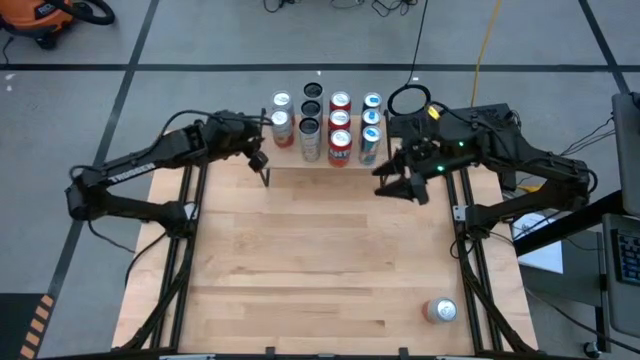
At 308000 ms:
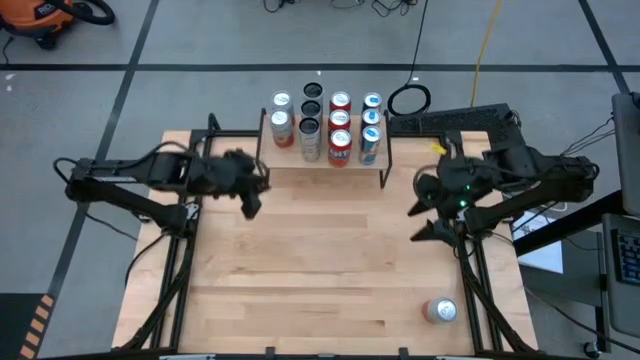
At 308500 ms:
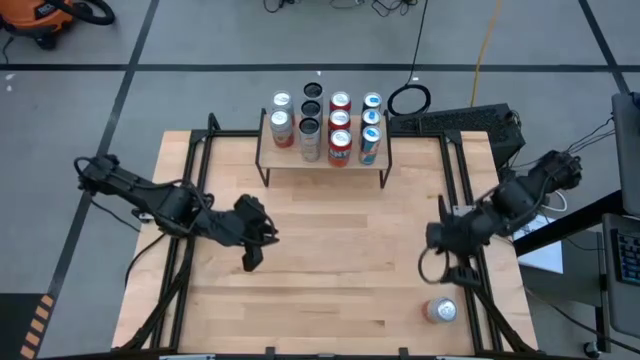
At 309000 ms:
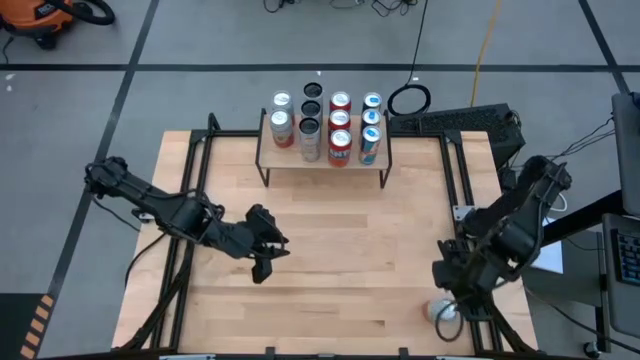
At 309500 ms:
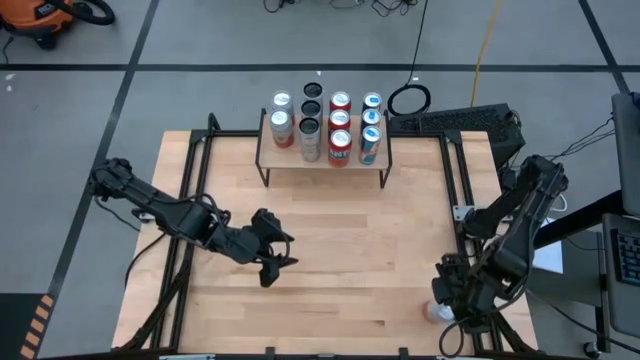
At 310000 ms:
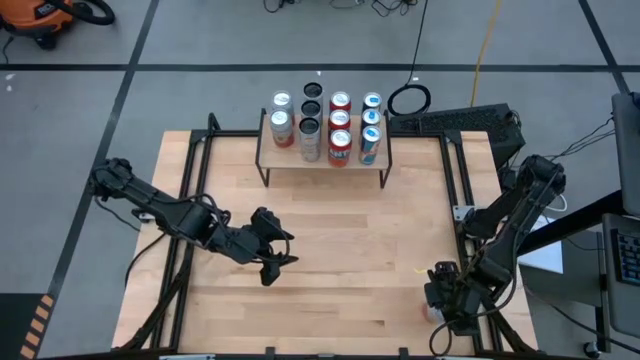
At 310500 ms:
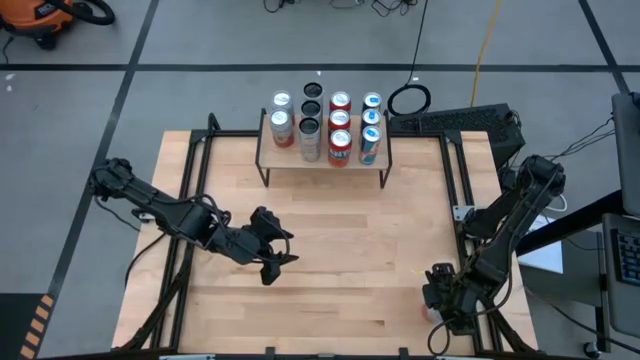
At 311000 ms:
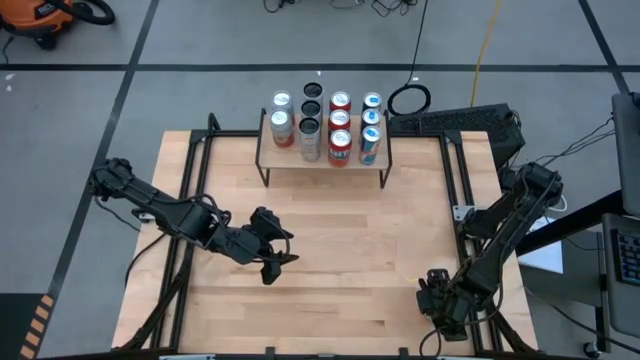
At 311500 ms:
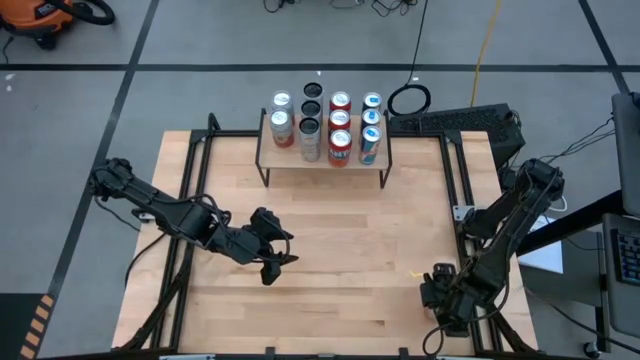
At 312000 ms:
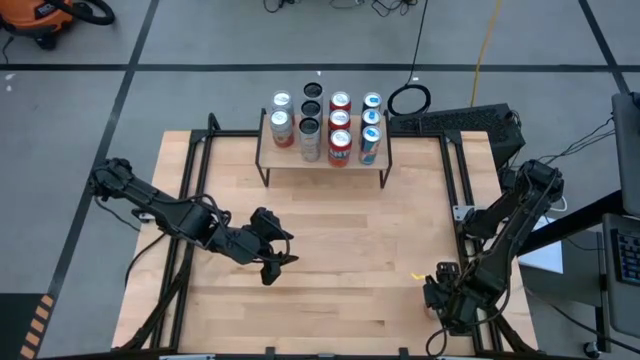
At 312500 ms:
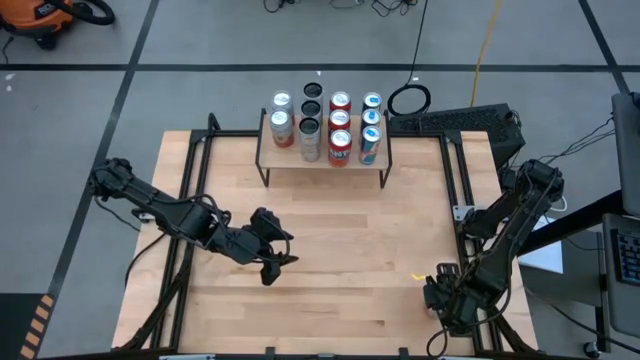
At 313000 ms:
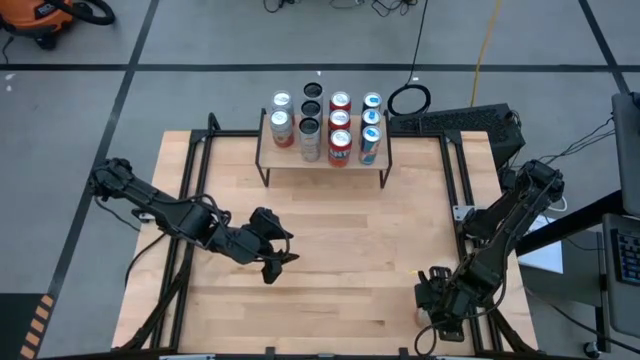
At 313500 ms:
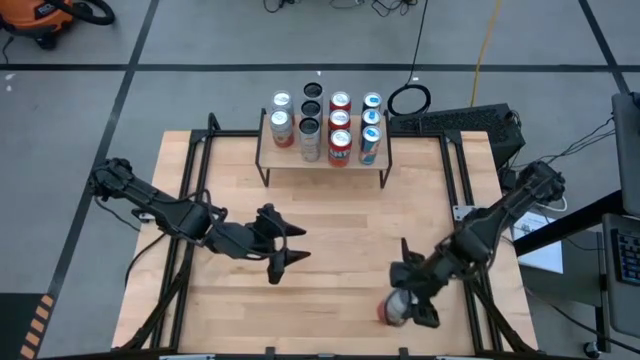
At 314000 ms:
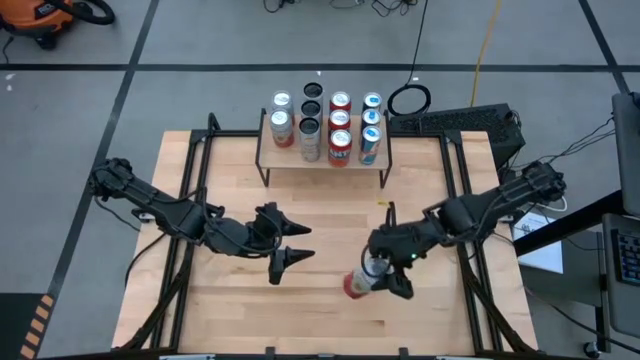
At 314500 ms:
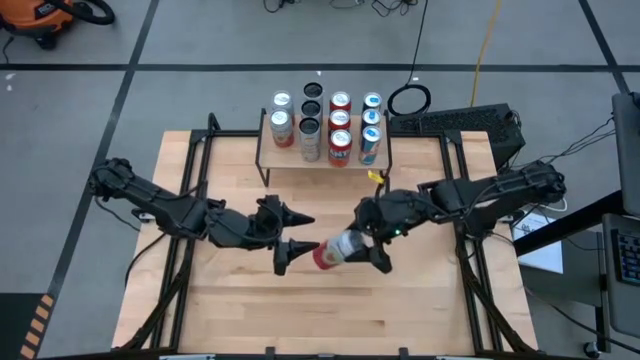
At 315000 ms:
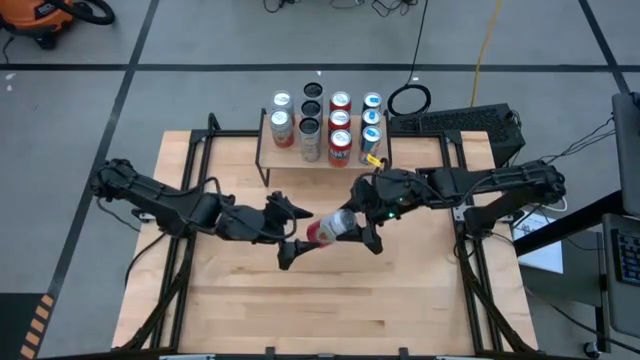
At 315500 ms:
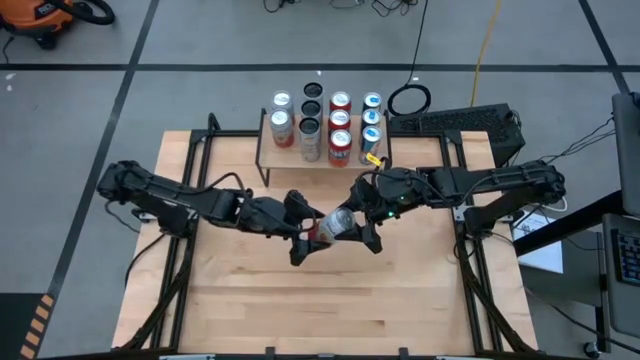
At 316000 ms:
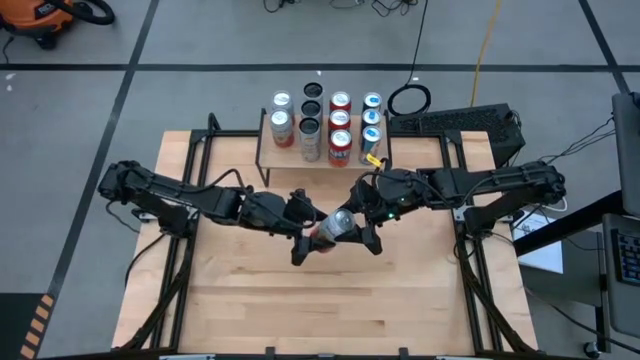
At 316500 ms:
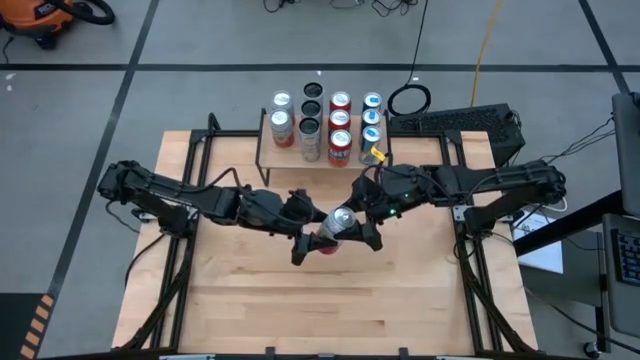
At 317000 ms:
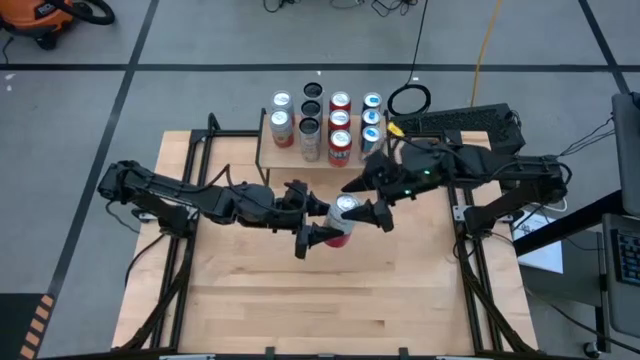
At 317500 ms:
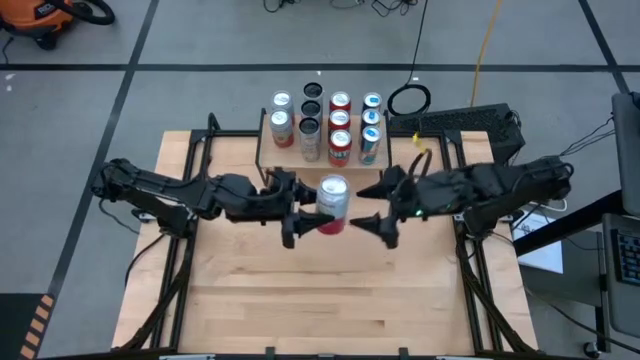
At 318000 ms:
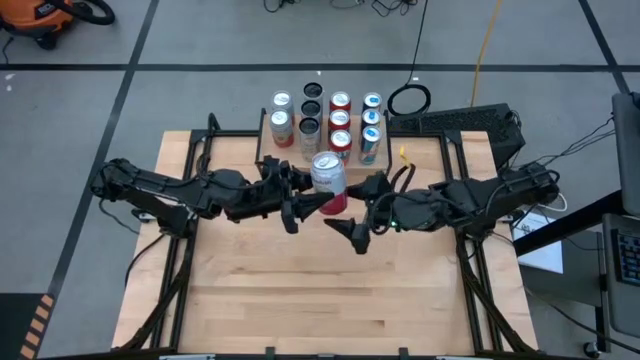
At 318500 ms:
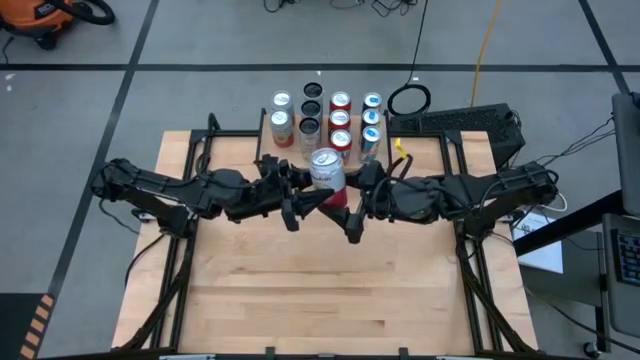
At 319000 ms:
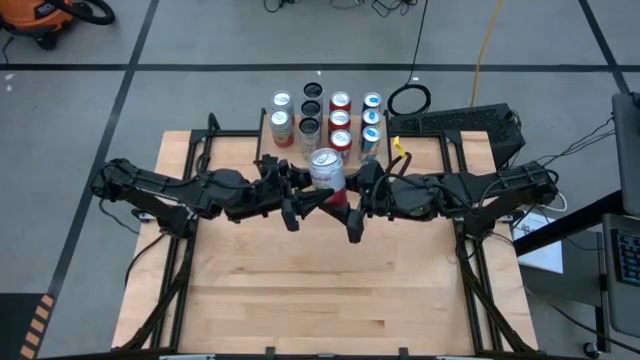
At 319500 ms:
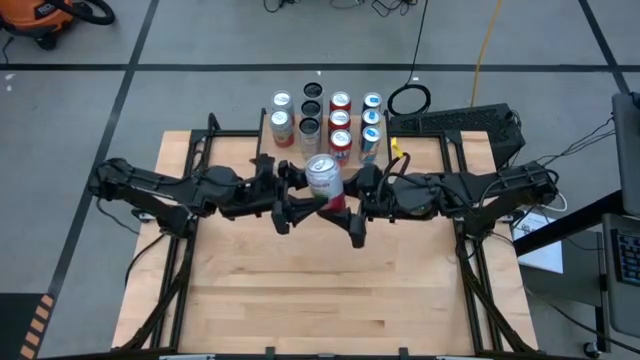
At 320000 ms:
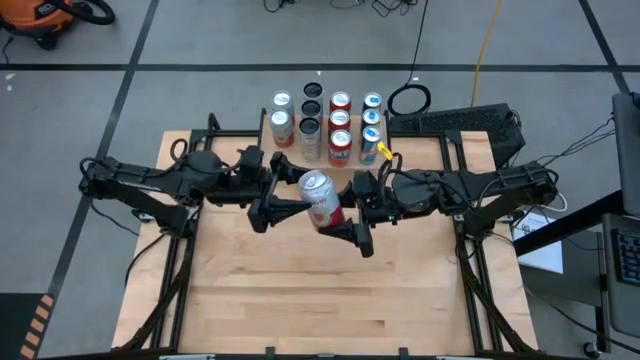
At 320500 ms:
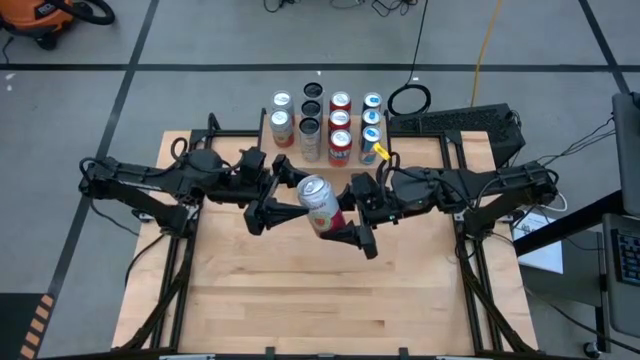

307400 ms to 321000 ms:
Task: Place canned beverage on shelf
Put the pink and white soda can aligned with the other pink and white soda can on the shelf
